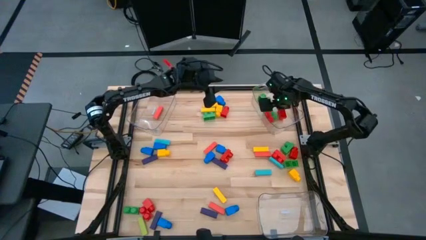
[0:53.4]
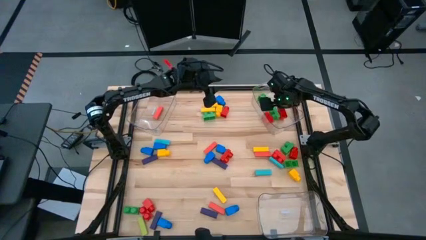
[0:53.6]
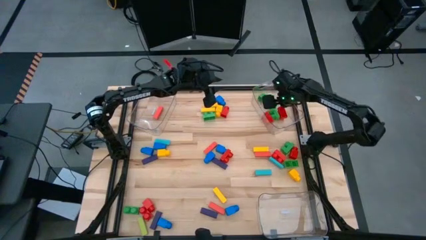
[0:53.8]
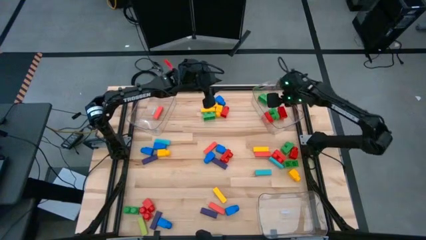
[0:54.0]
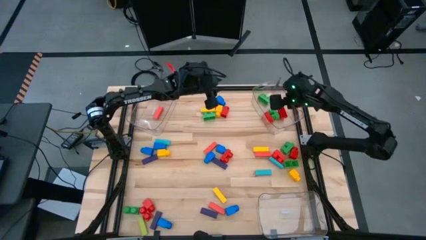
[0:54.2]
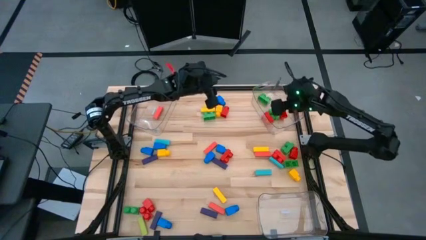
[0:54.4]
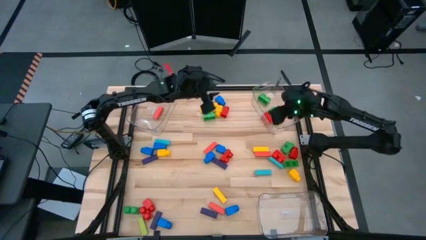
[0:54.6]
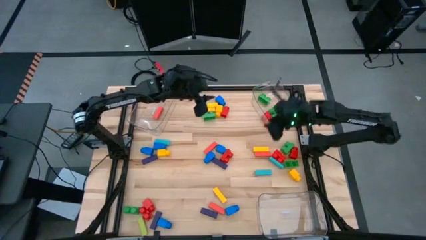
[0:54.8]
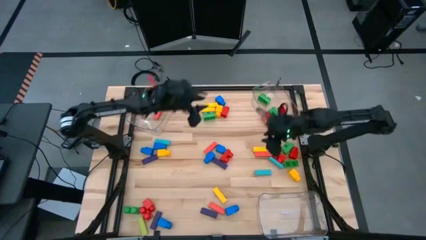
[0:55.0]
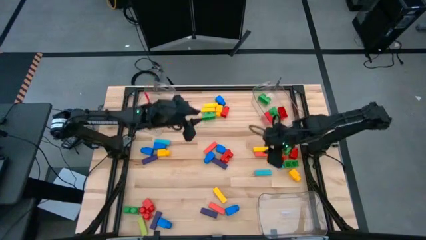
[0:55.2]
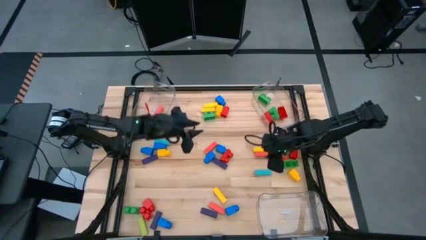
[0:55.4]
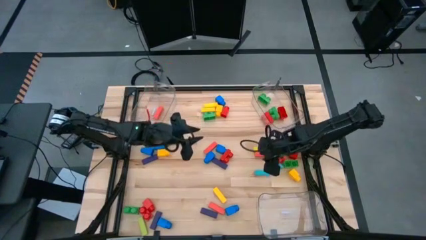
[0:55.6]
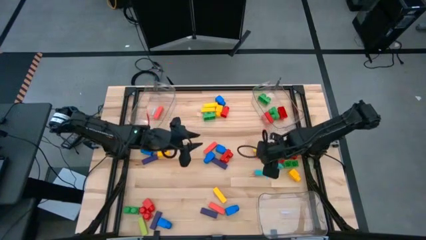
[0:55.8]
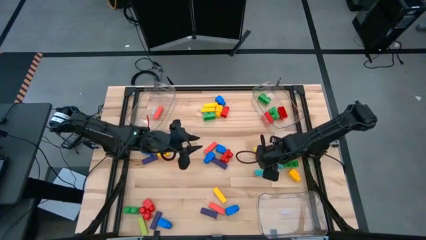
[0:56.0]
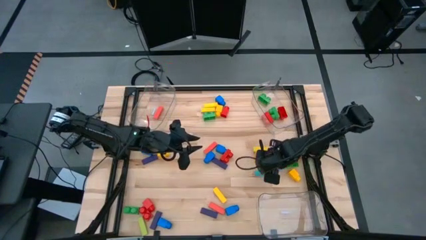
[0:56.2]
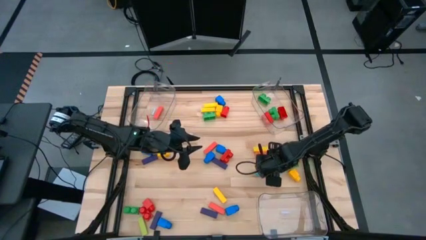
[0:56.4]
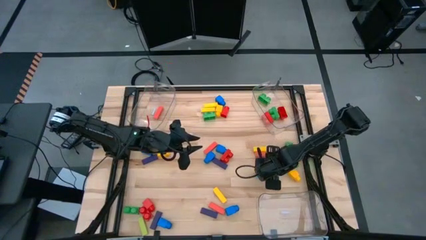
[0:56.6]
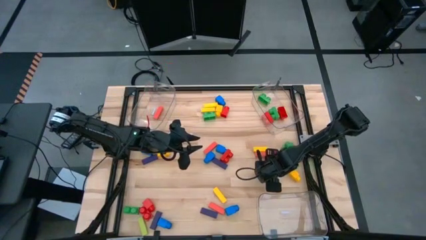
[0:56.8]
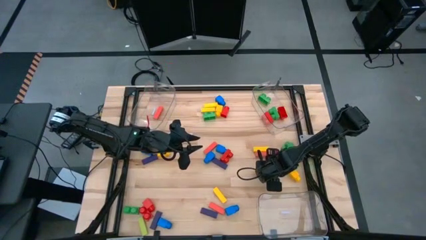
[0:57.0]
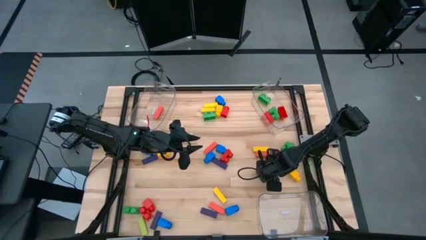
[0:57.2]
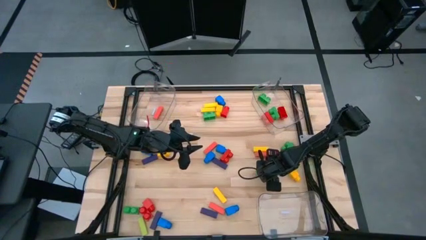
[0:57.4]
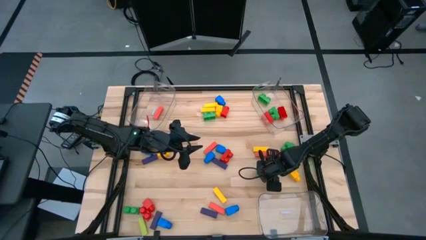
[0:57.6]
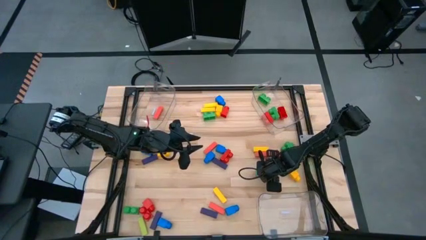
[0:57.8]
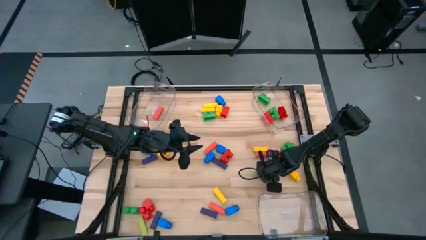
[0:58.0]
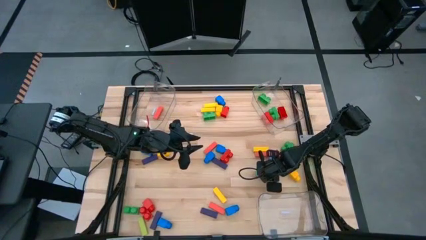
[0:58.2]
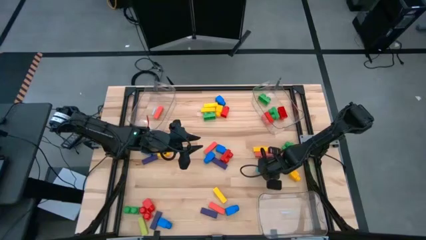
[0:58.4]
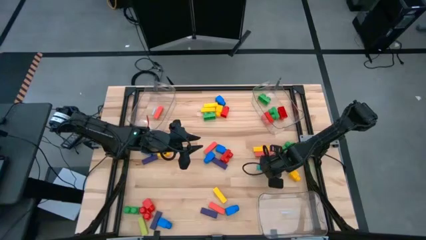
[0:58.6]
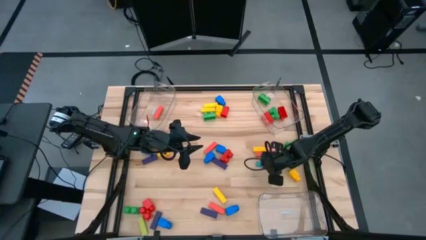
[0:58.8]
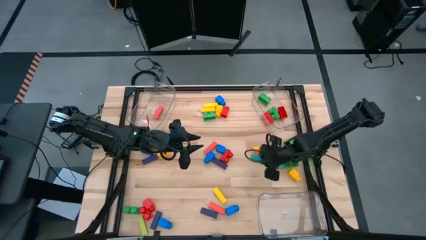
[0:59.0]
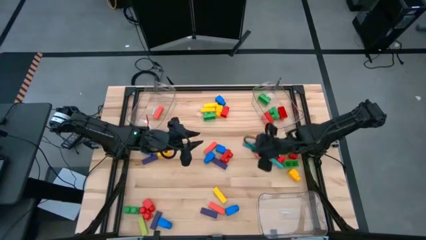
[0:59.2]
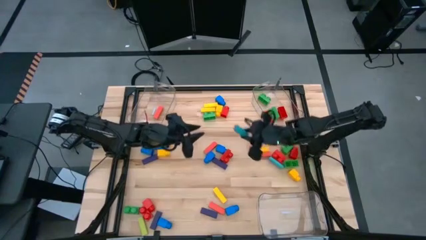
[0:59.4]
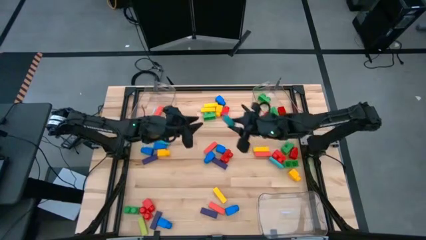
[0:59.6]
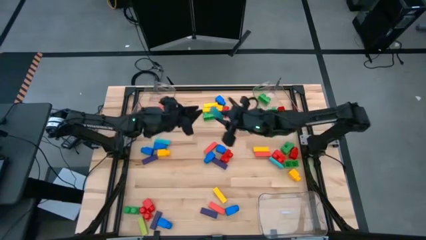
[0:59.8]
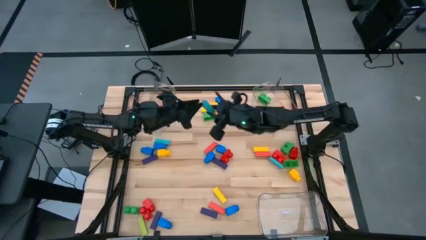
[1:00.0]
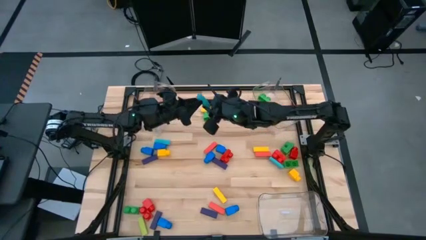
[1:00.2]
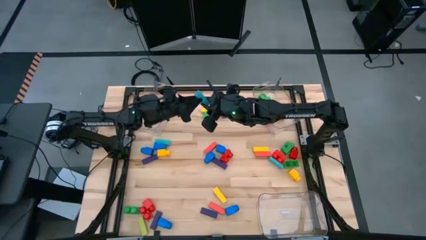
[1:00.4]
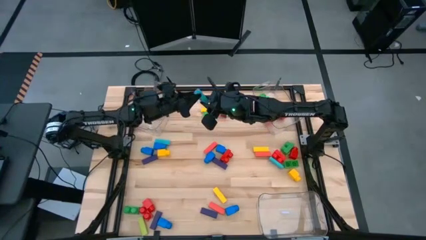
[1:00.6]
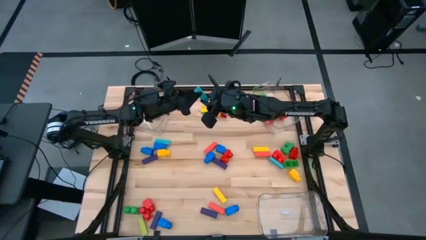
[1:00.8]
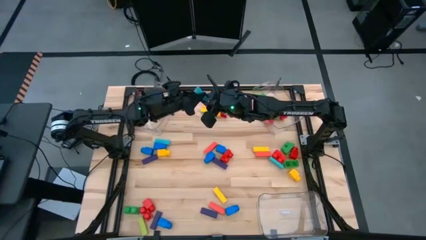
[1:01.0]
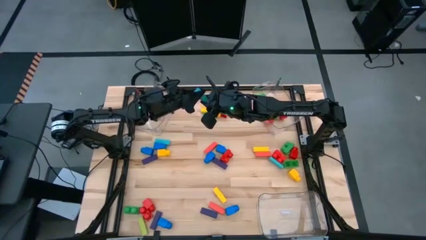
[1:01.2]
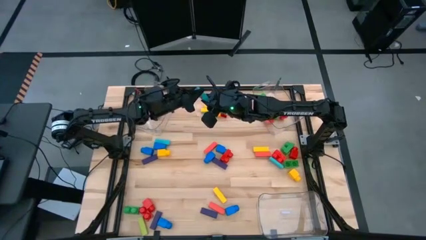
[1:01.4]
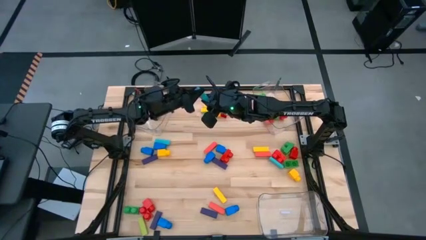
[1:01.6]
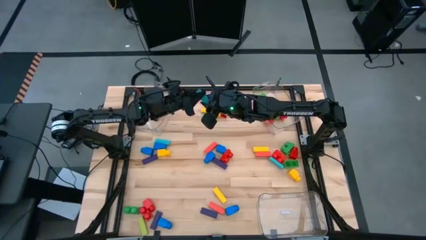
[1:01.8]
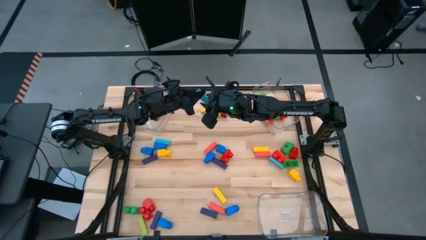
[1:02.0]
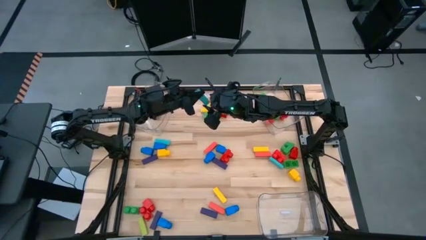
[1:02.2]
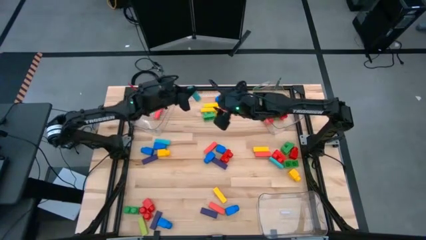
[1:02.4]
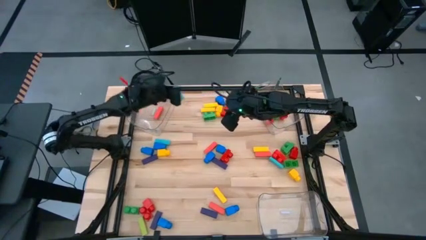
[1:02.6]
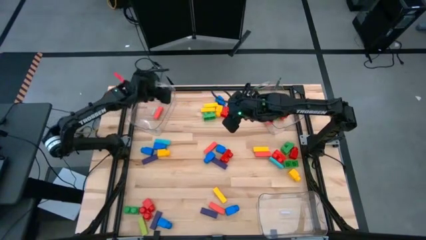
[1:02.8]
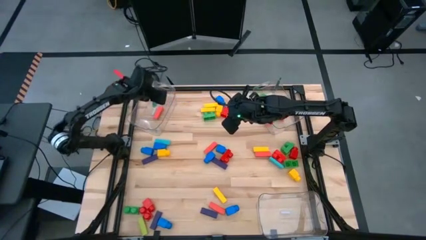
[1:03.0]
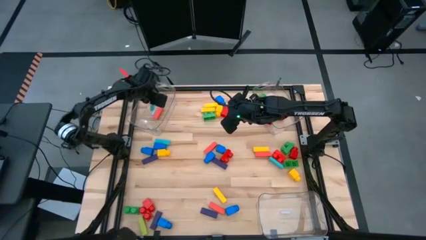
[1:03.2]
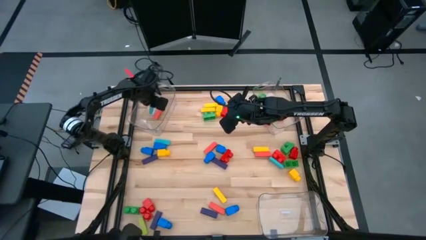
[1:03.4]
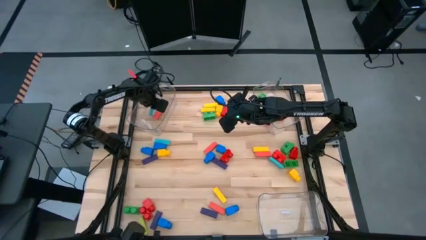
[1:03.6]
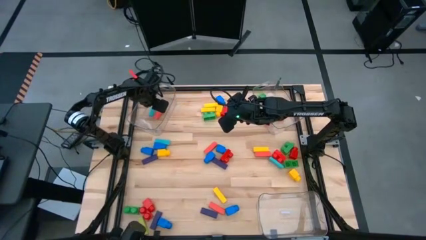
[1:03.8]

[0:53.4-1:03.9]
Task: Sort blocks by size
Put the light blue block into the top left transparent bin
